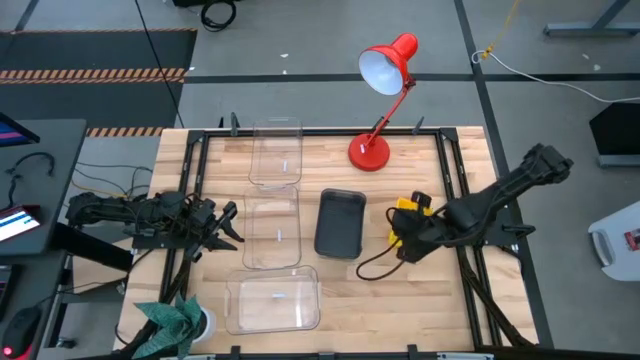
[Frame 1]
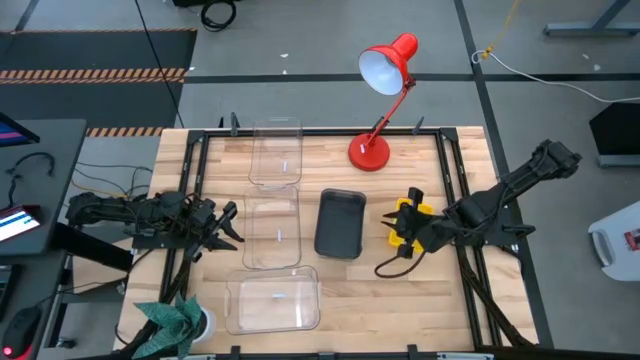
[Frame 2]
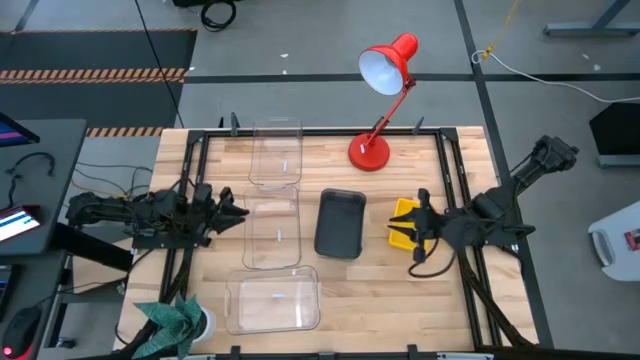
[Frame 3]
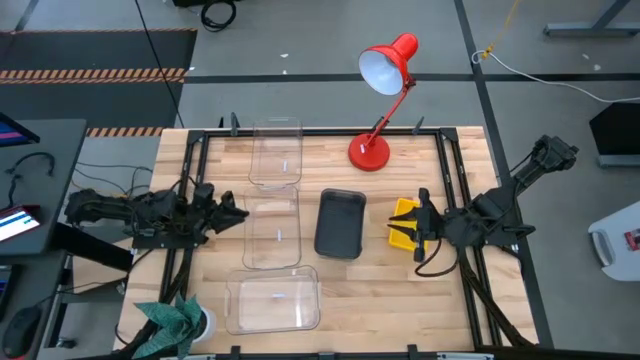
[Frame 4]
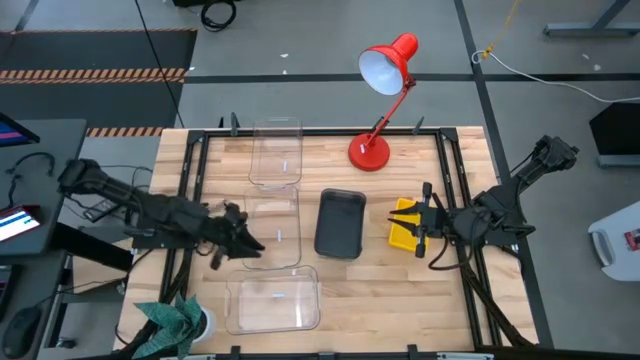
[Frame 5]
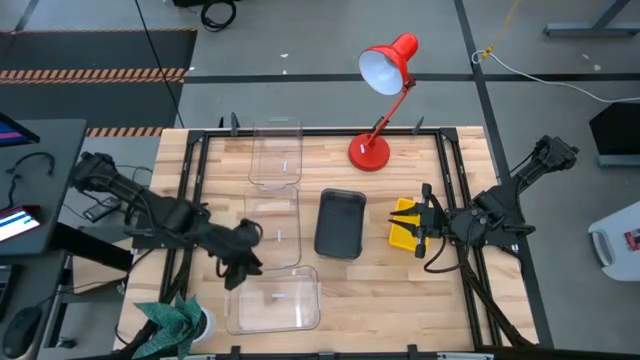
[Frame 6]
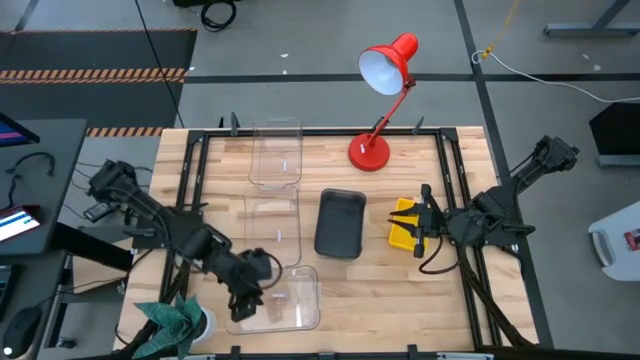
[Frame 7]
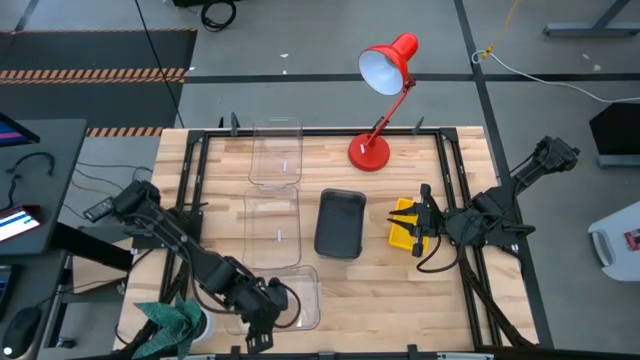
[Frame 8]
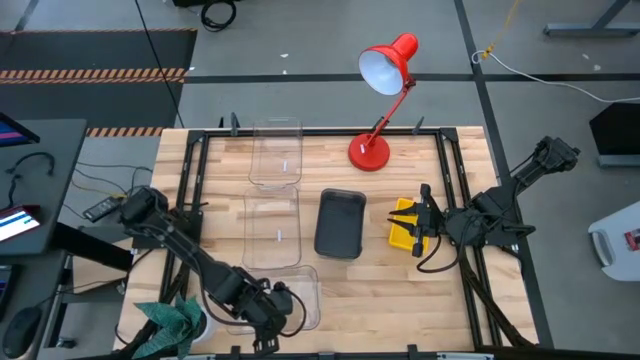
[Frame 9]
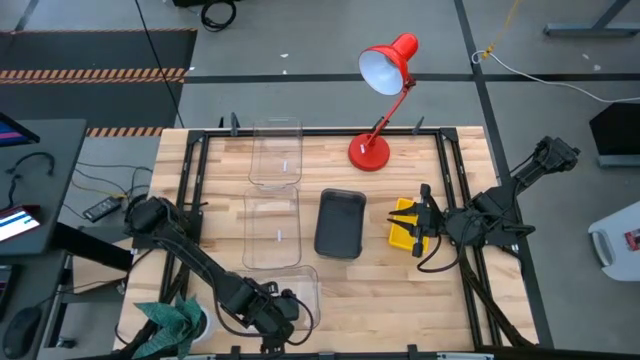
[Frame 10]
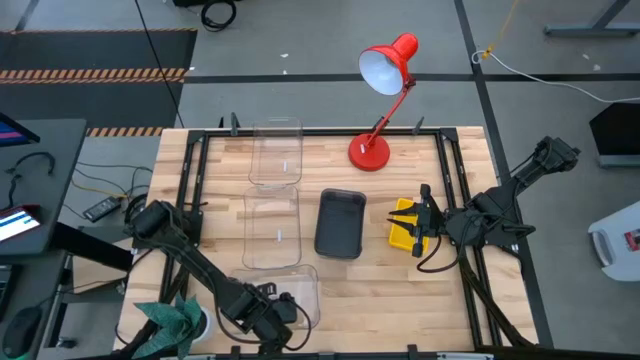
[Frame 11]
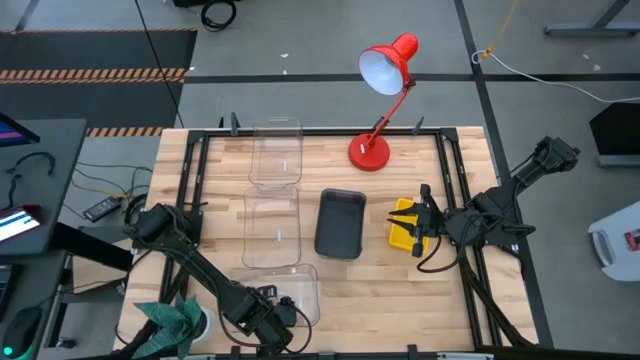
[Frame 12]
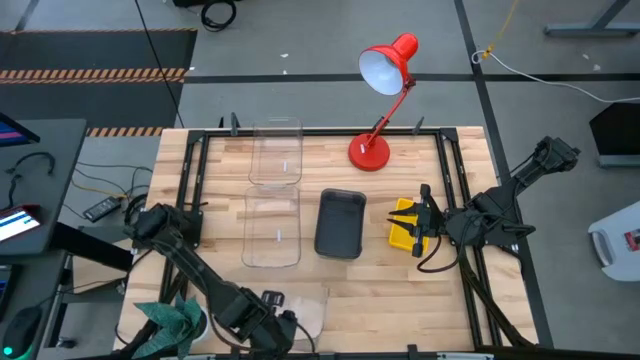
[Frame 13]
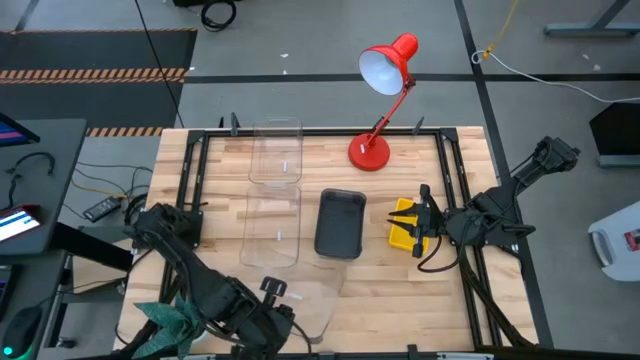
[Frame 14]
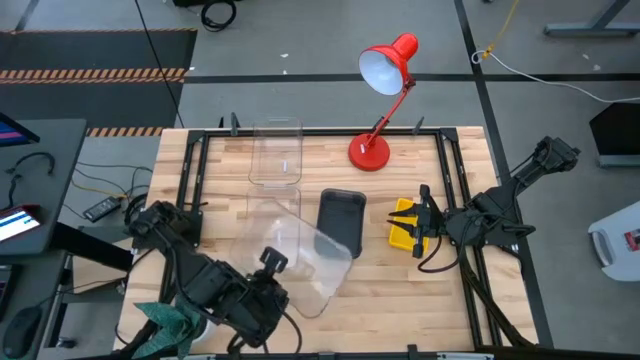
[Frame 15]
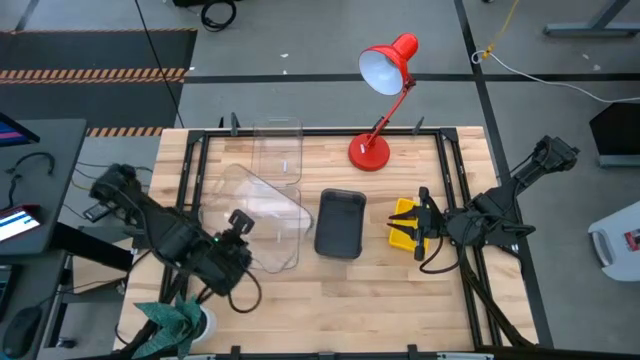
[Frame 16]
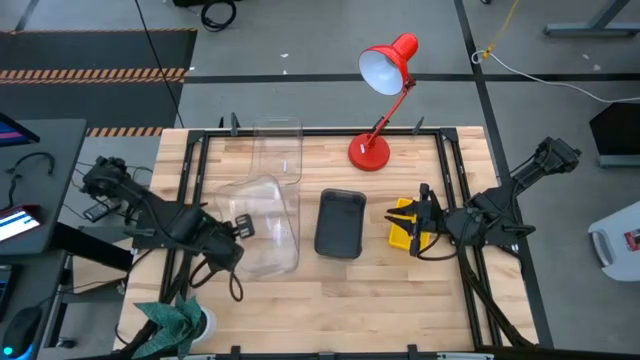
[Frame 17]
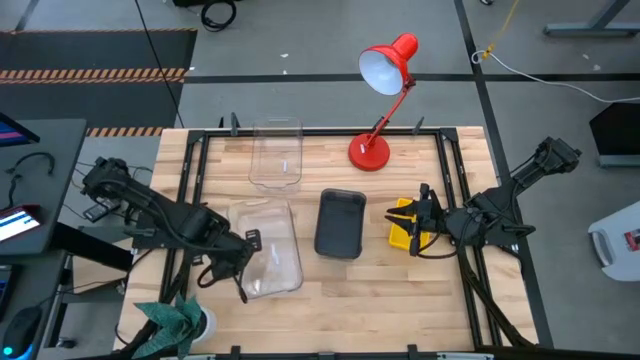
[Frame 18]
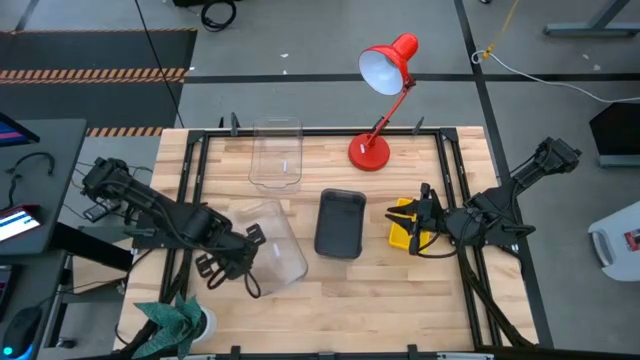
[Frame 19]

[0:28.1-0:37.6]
Stack the bottom transparent bin on the middle transparent bin

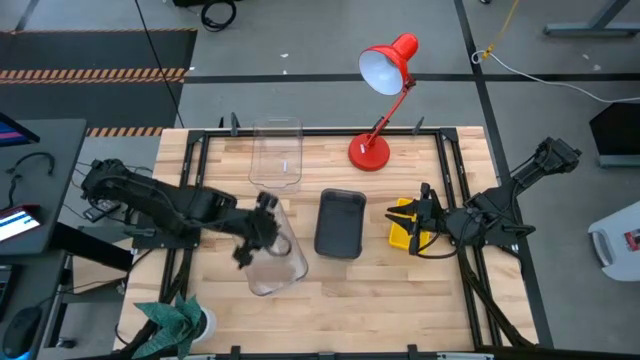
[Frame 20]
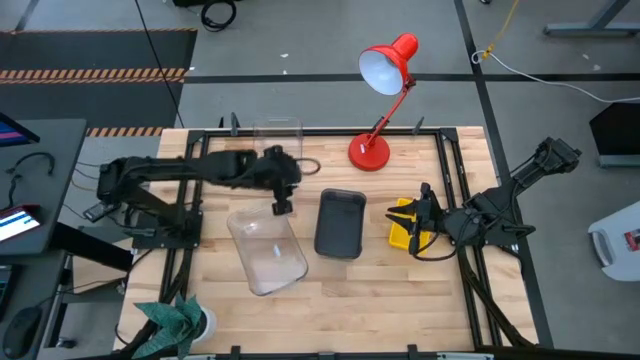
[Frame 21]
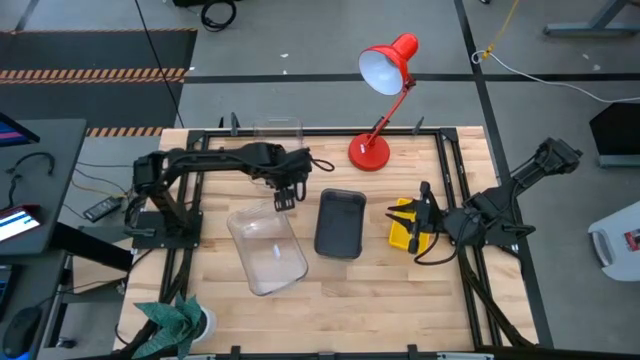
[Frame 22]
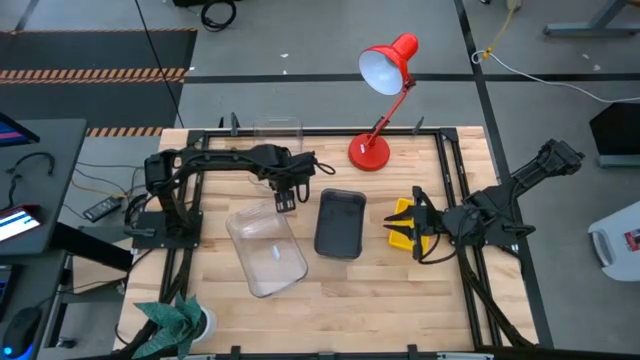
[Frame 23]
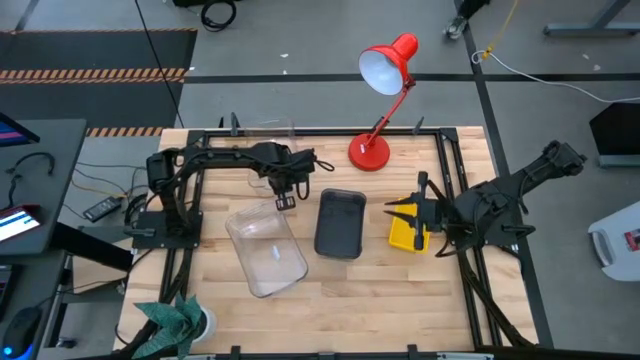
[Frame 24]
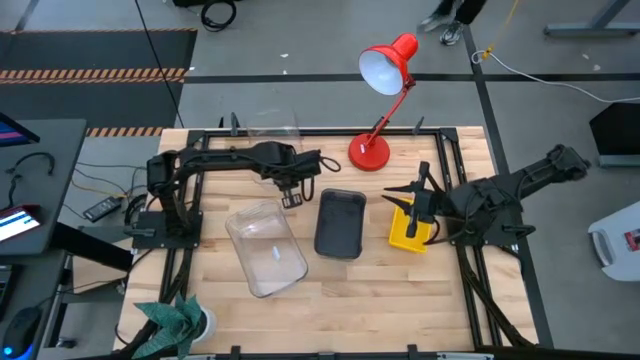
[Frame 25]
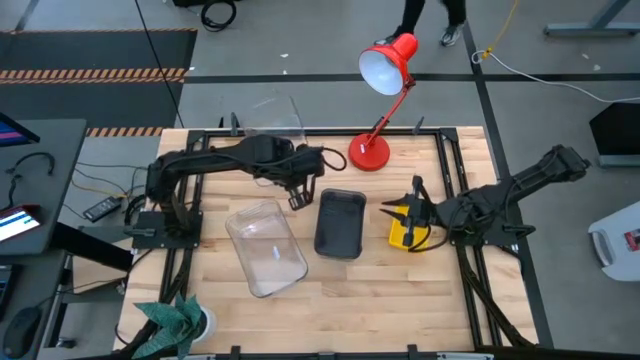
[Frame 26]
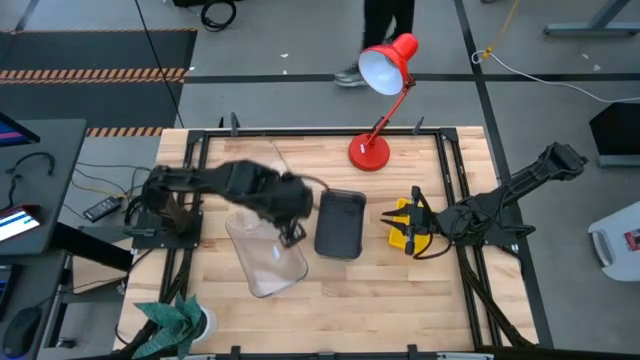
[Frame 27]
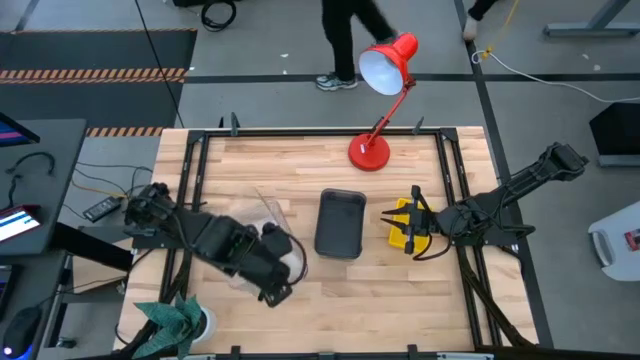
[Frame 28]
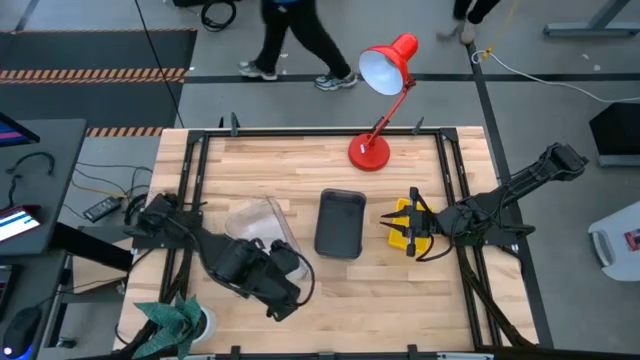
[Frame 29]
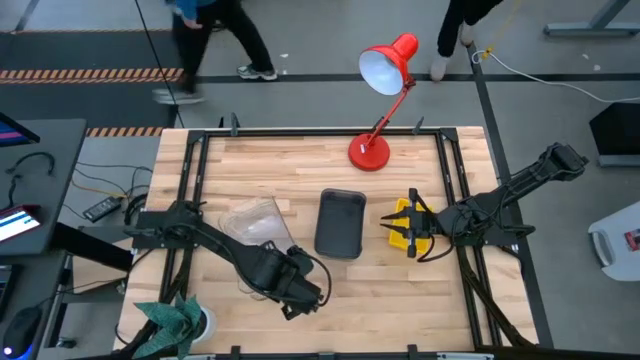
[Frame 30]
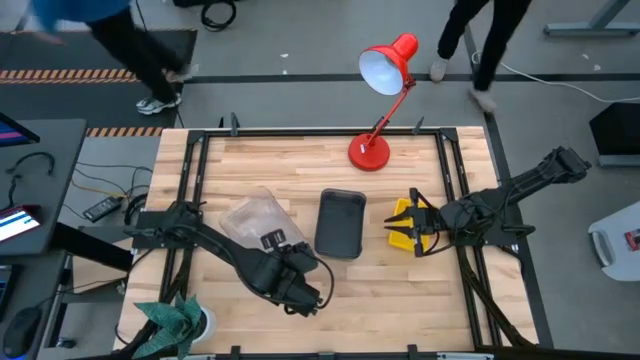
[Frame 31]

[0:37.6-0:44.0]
Stack the top transparent bin on the bottom transparent bins

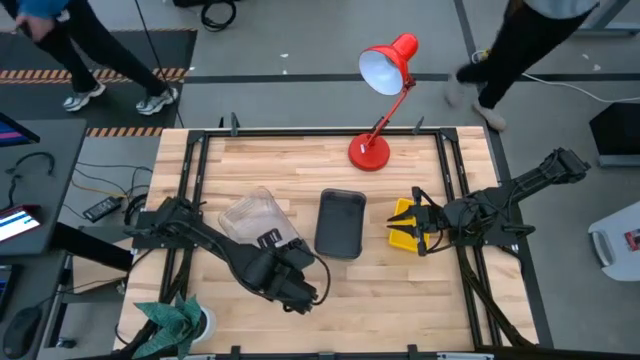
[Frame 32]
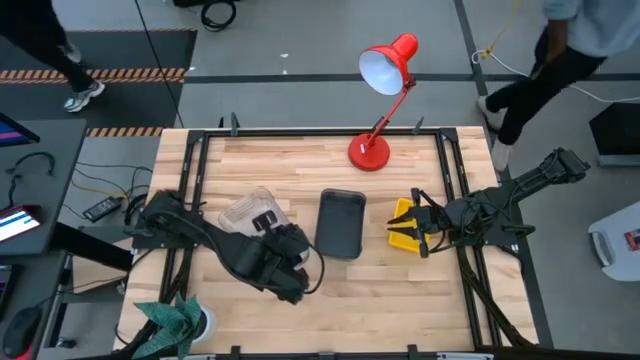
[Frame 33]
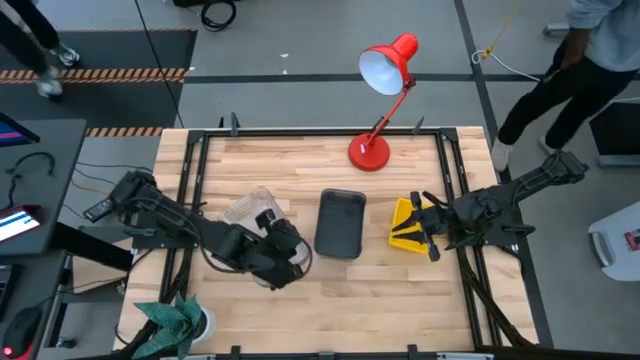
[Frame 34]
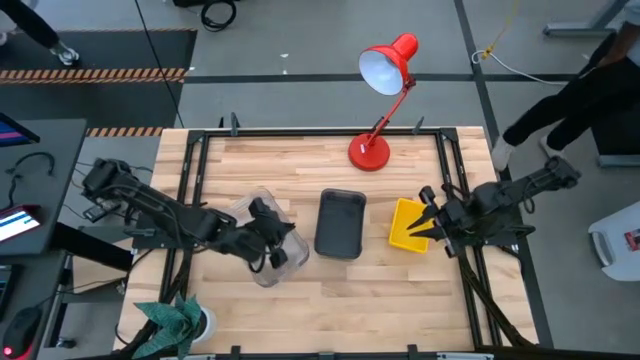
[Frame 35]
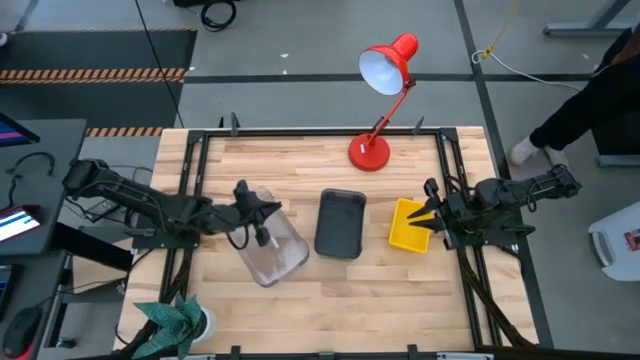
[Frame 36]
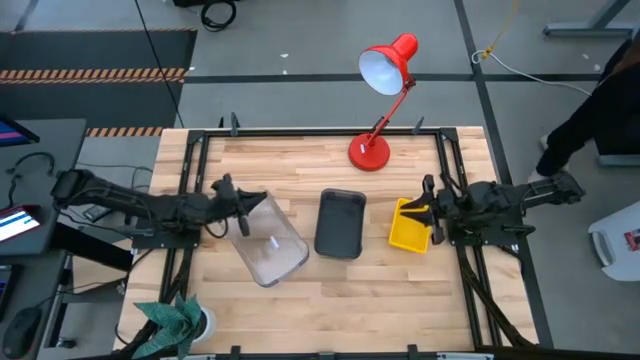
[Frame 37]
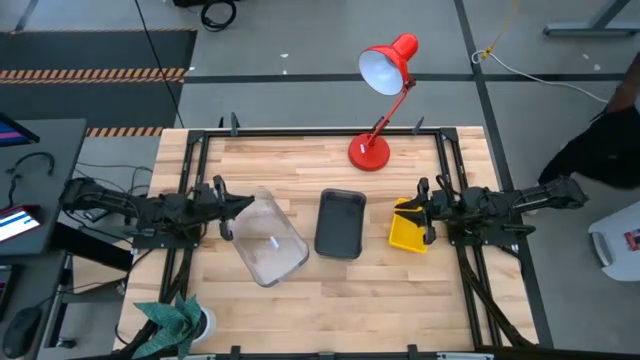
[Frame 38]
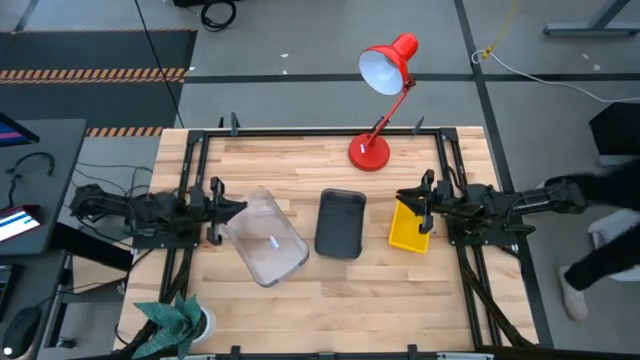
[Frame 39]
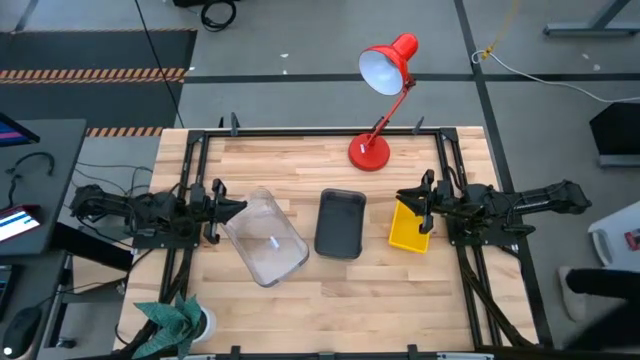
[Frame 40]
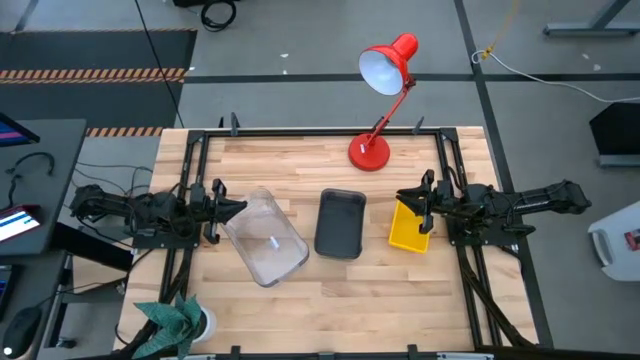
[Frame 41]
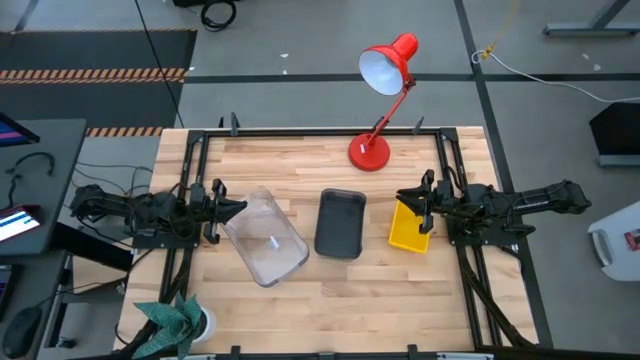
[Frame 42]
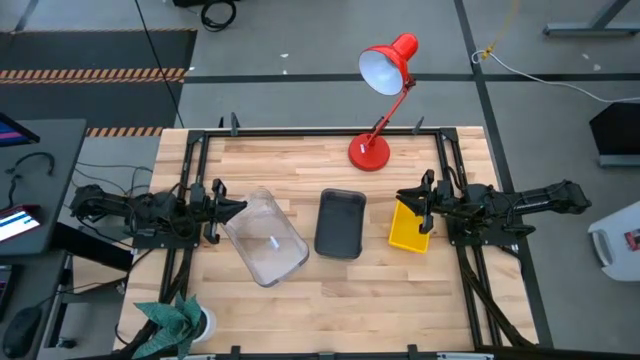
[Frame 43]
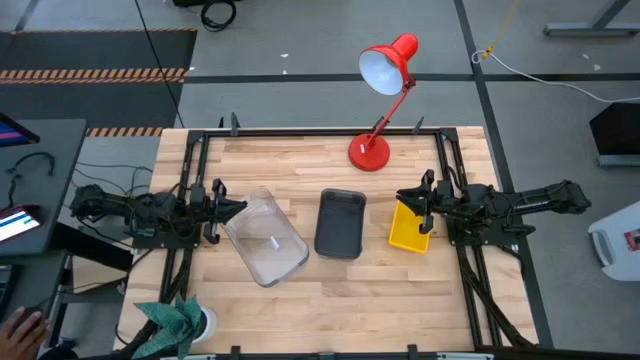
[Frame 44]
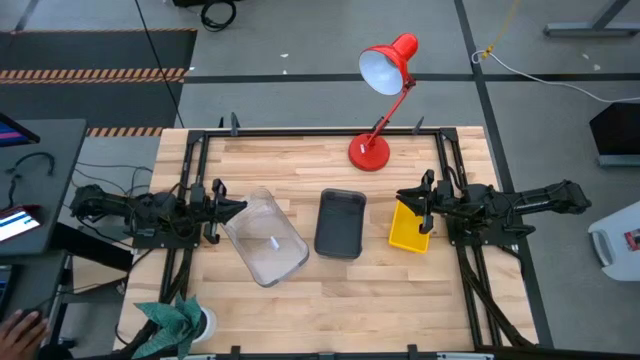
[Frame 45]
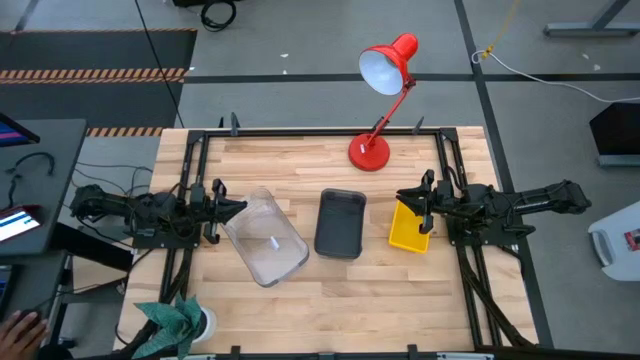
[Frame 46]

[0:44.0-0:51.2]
Return to Home Position
